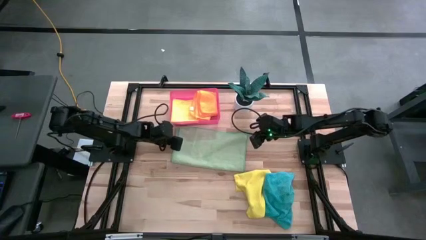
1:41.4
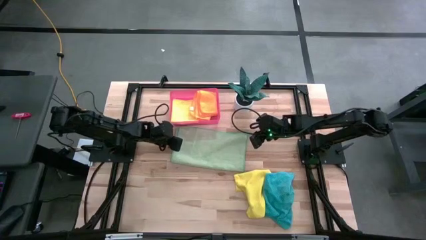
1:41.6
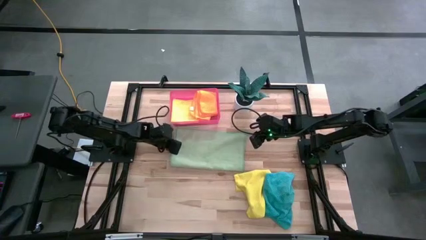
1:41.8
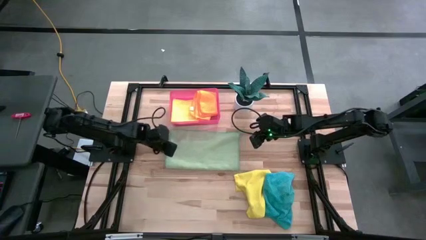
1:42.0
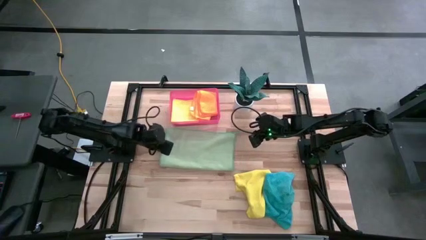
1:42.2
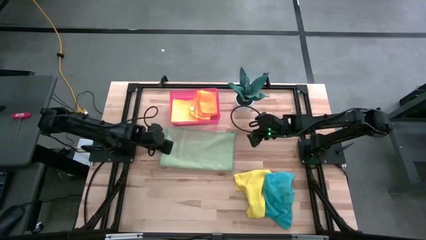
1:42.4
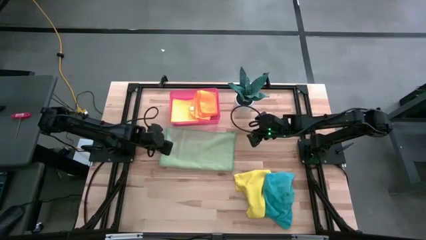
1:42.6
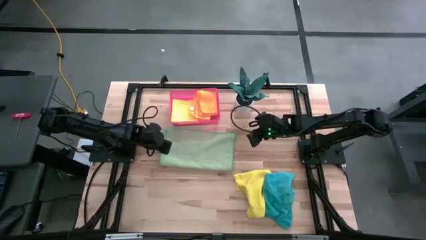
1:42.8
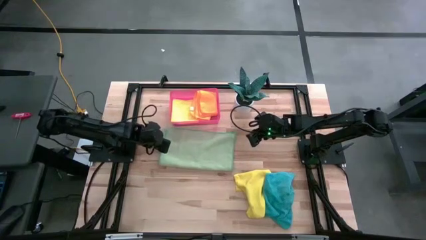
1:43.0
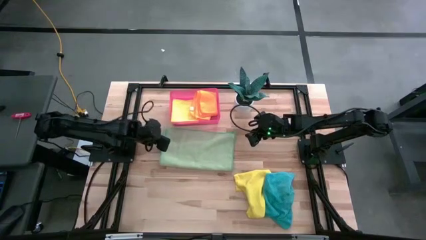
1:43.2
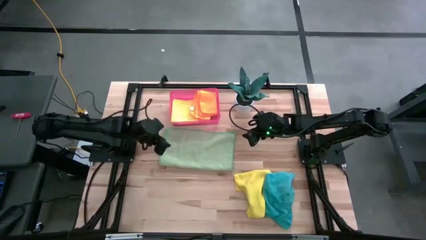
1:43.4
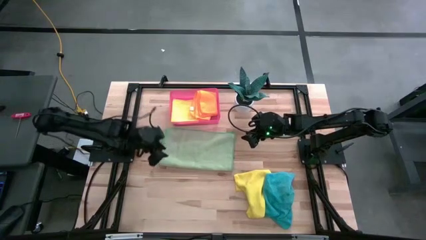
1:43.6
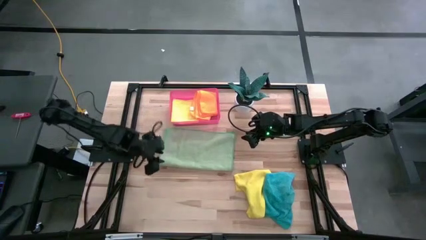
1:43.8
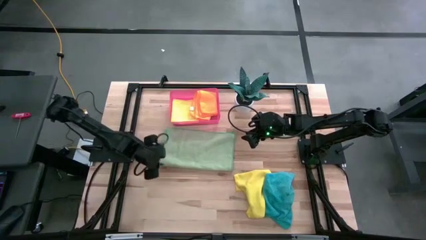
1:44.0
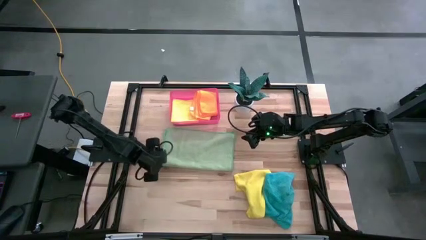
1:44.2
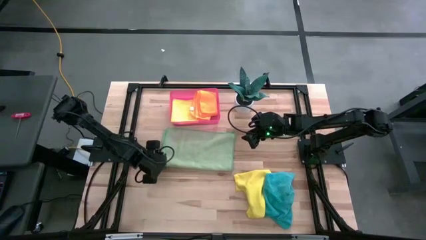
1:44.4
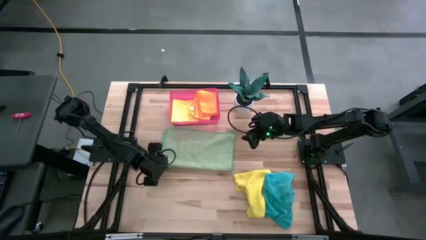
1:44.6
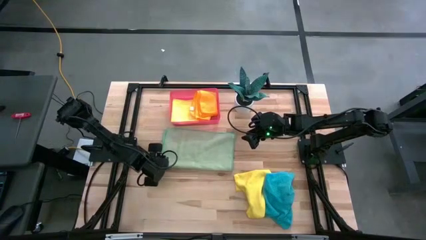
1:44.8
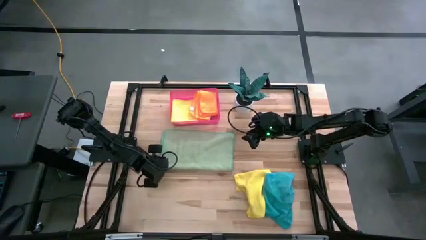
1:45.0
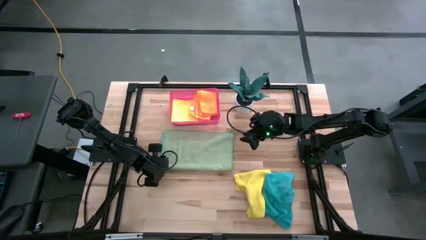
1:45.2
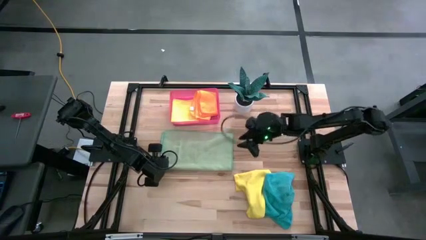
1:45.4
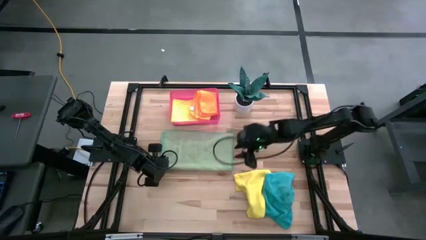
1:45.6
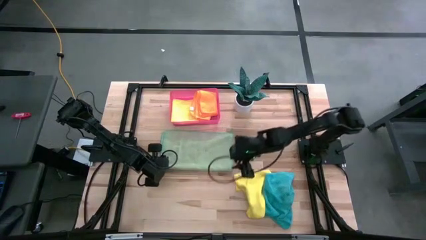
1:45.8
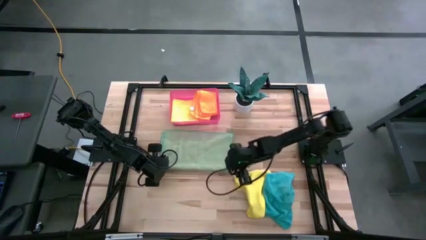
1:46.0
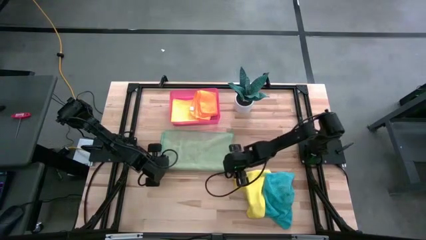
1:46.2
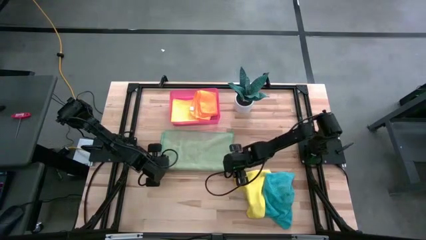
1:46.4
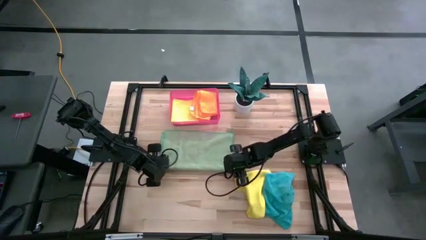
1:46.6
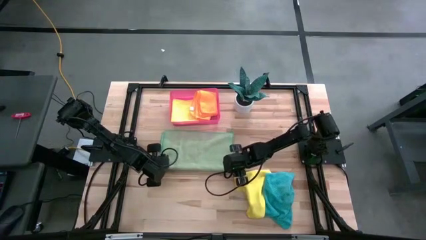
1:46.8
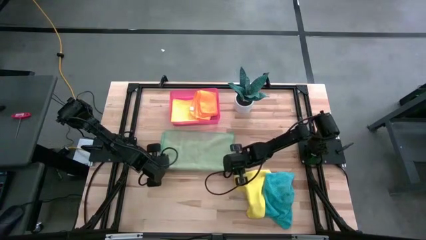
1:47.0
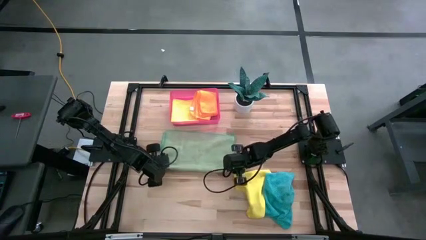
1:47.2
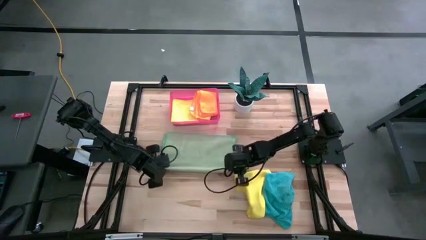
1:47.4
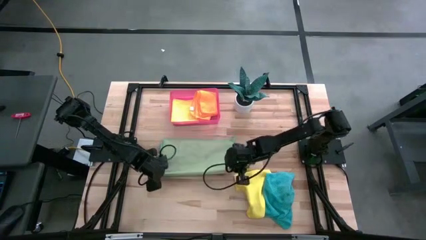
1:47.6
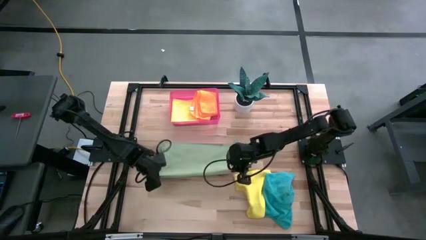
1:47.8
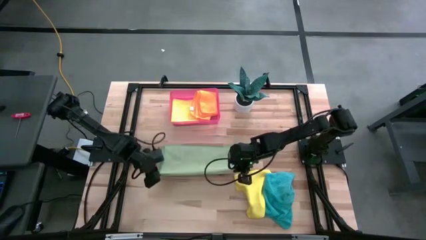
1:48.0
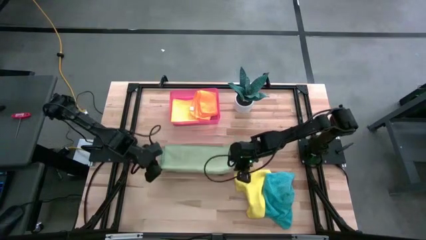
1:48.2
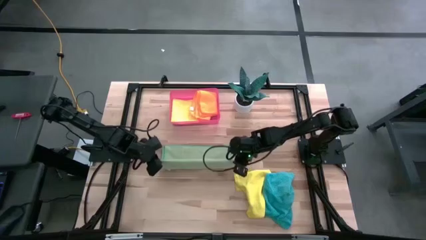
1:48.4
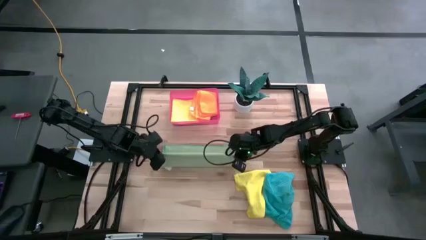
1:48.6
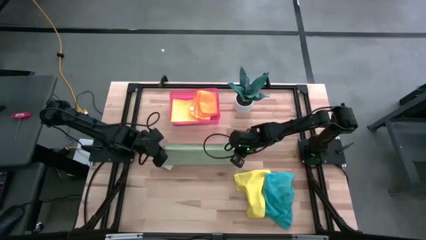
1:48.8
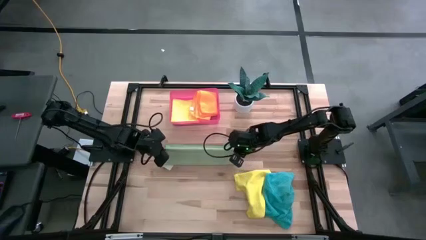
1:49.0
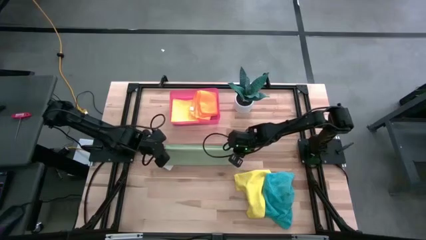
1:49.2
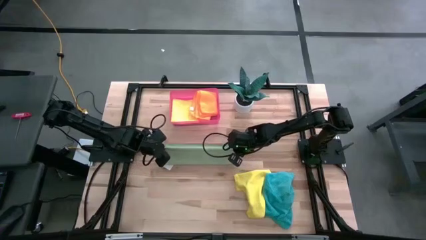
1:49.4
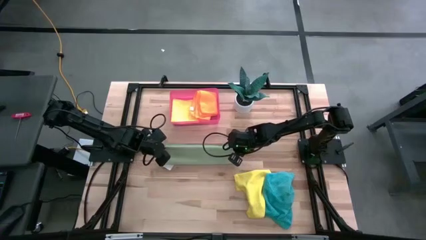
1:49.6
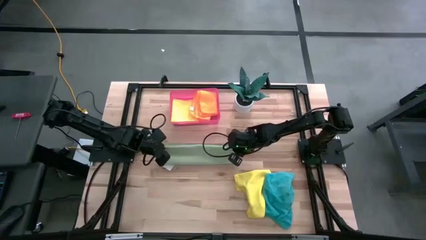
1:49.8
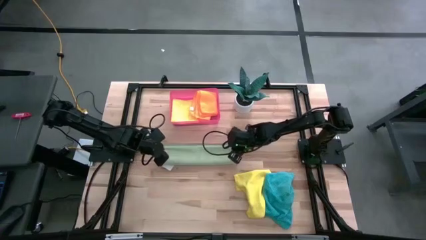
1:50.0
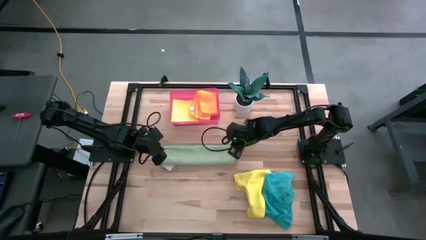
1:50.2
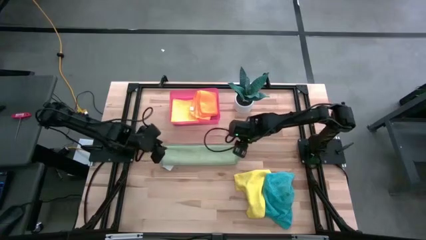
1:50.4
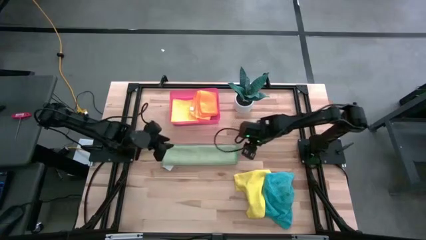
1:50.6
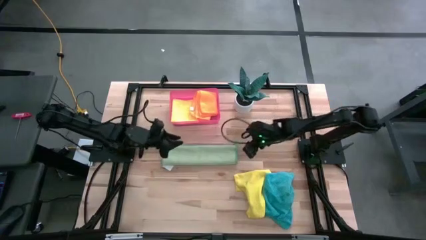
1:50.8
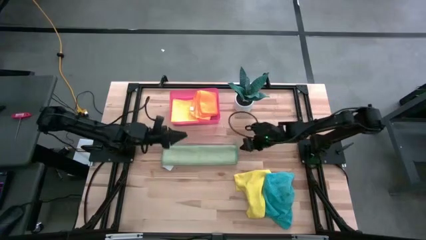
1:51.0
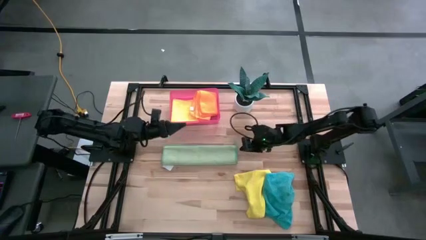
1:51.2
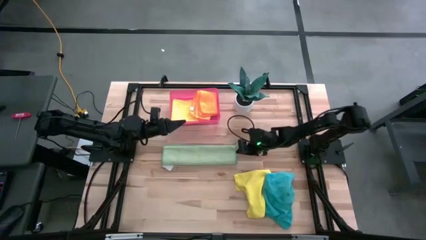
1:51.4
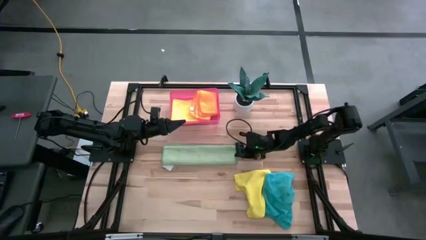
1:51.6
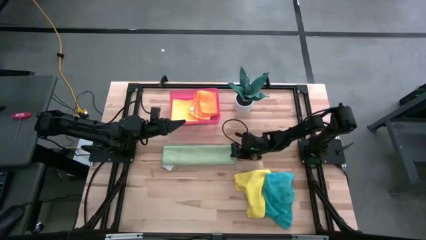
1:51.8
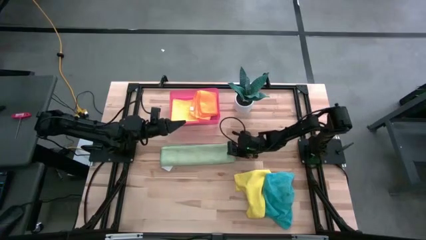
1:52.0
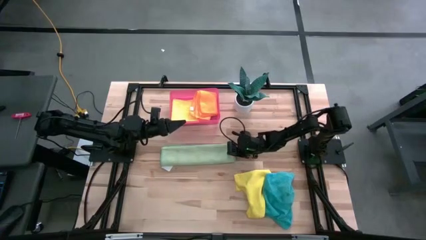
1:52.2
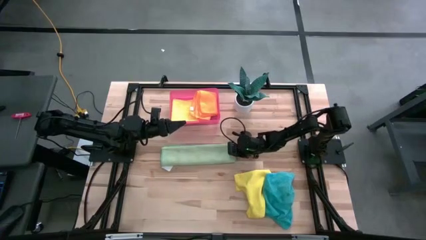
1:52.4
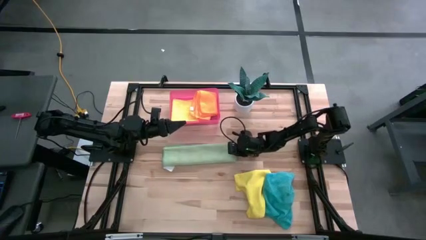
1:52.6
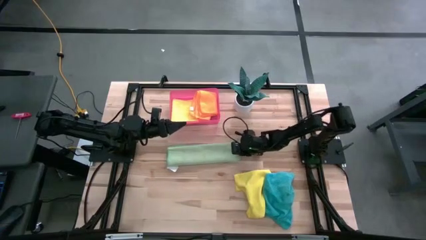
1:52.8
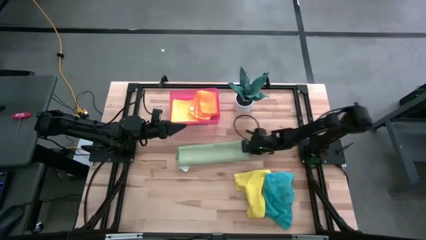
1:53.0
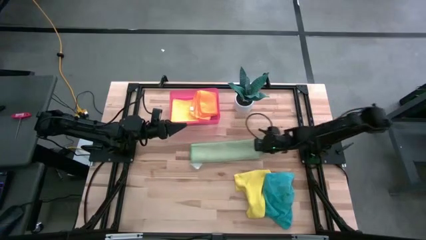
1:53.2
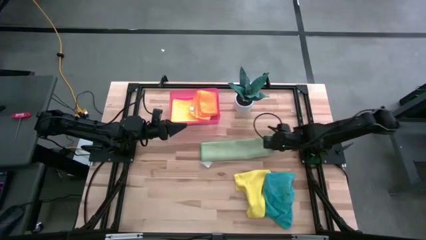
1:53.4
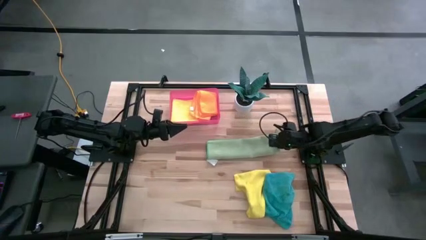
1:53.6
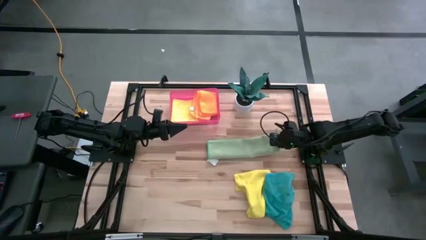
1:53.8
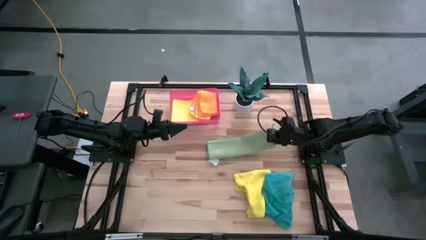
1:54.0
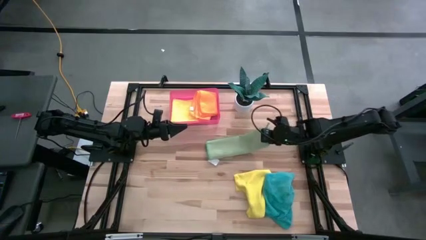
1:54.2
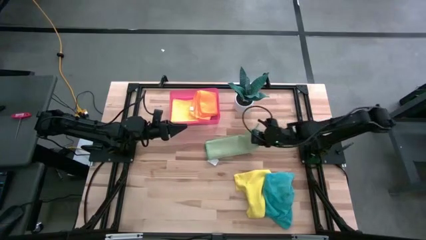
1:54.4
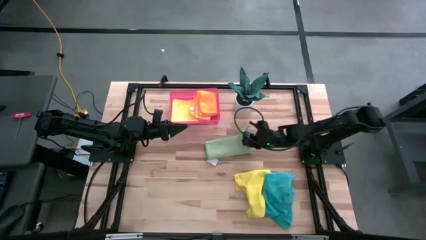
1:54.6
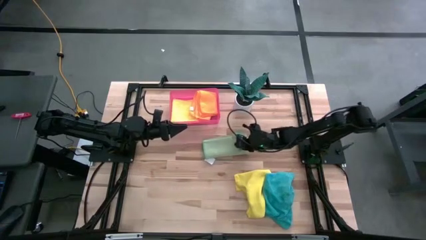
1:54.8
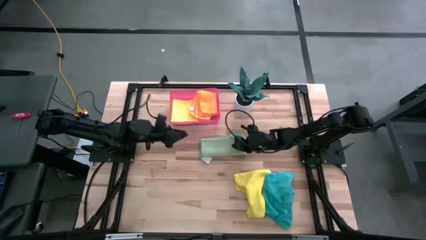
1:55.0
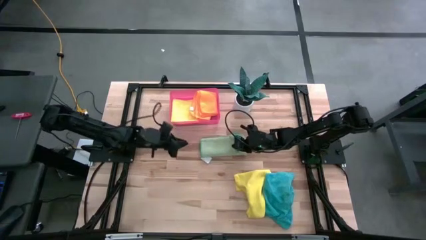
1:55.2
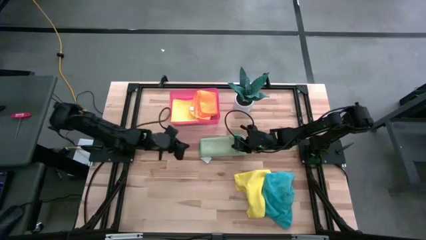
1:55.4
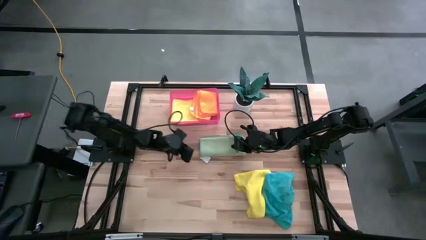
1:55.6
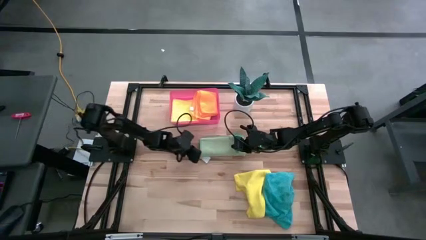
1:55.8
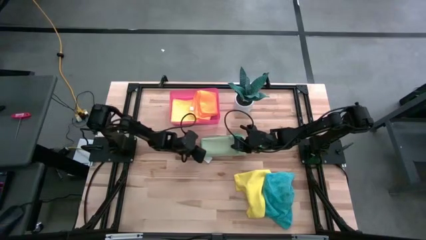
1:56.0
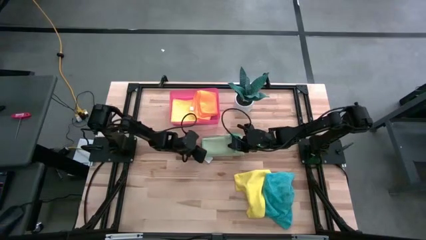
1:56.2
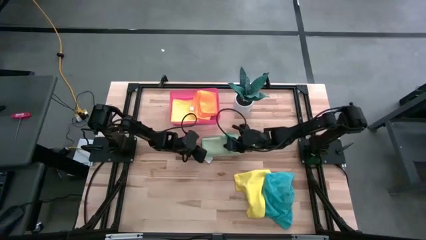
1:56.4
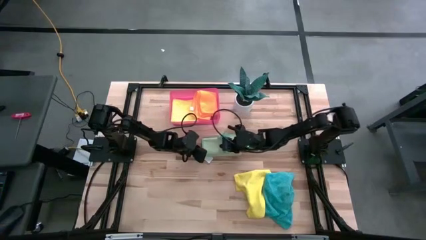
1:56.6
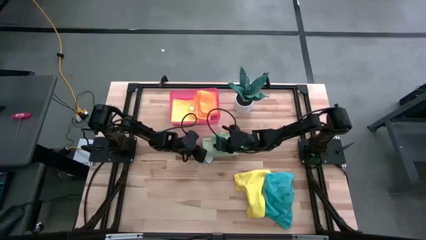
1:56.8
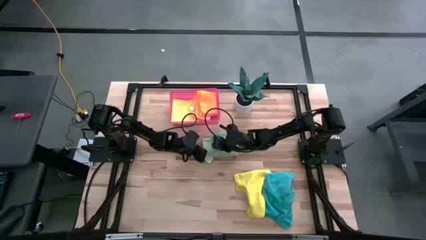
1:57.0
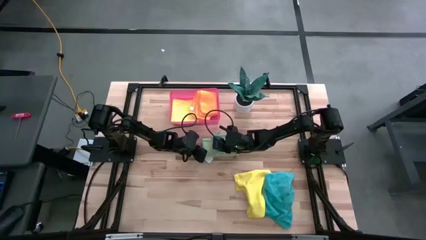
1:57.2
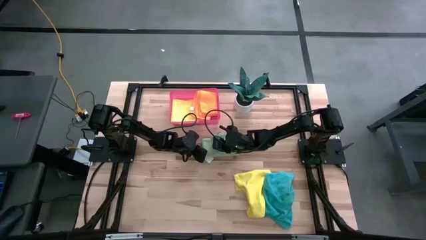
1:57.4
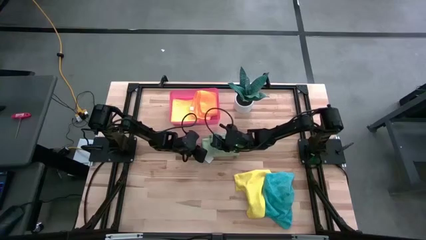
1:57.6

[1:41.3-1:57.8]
Task: Fold microfiber towels
Fold the green microfiber towel
